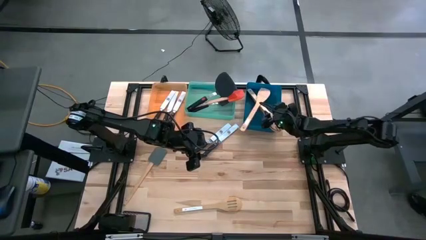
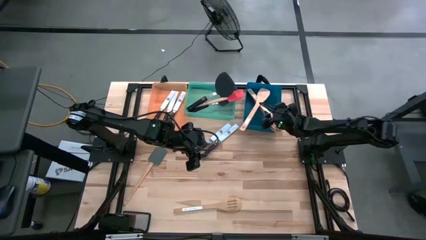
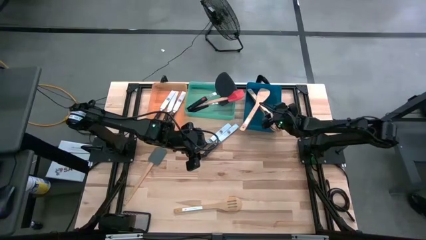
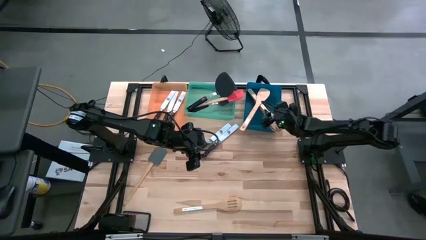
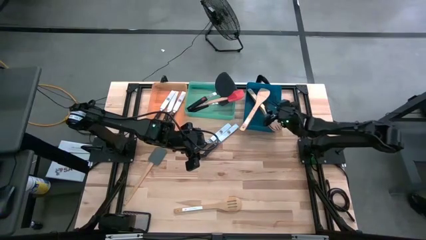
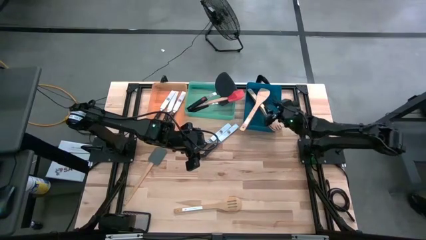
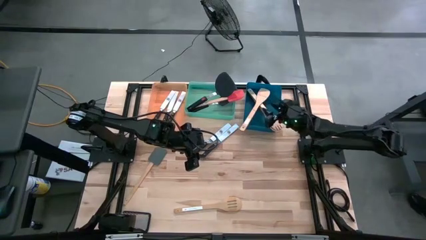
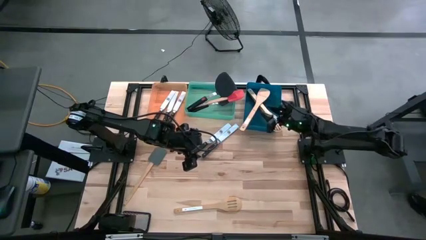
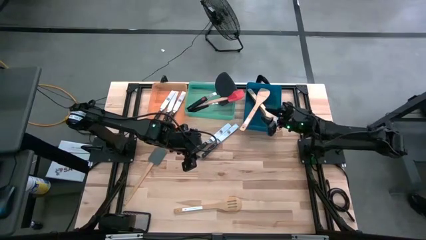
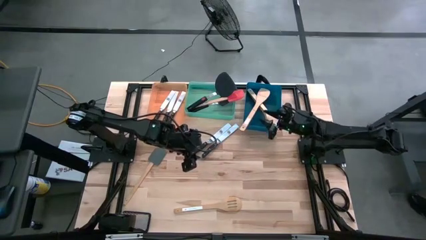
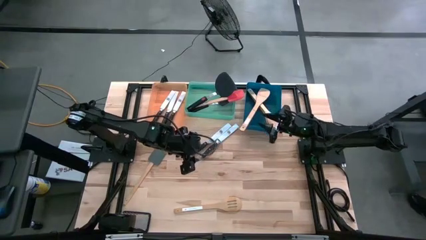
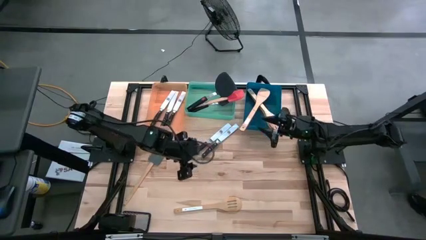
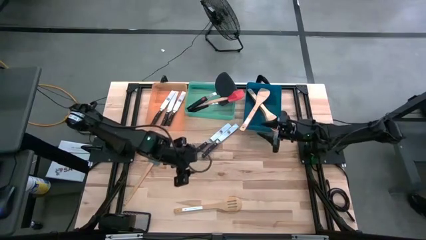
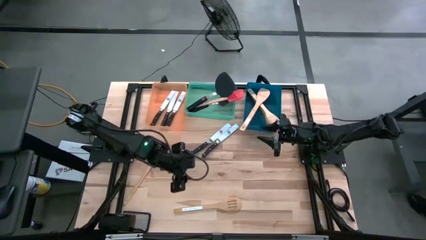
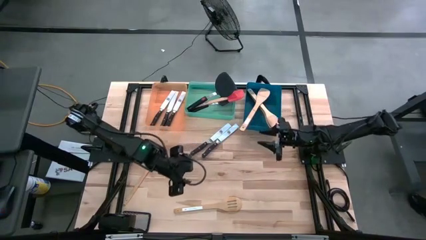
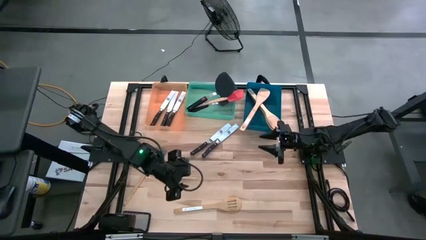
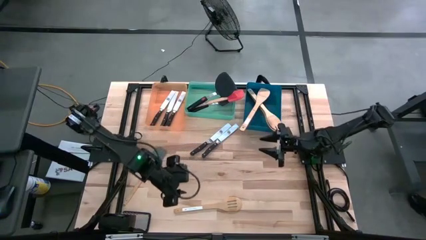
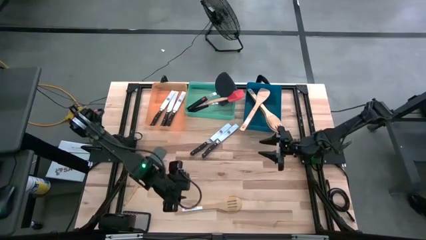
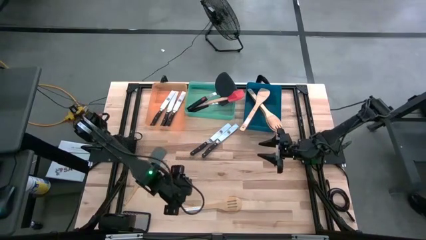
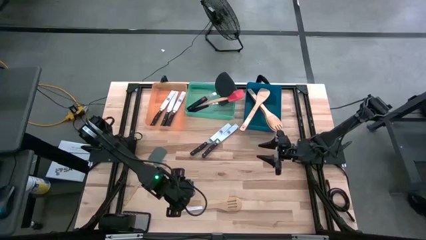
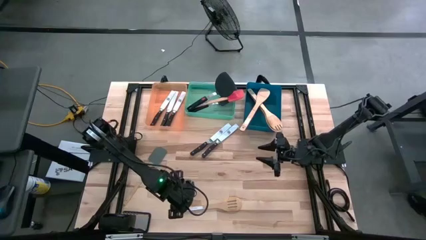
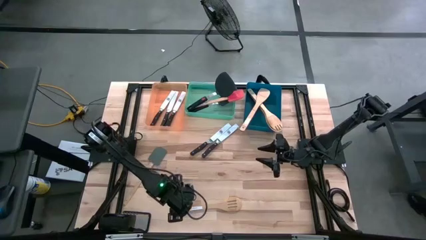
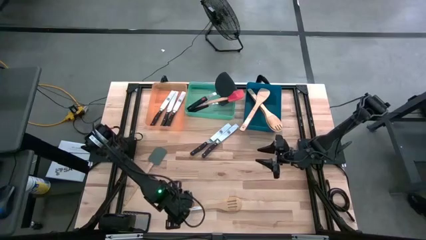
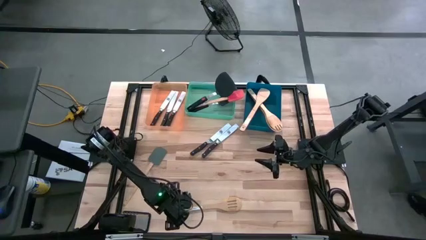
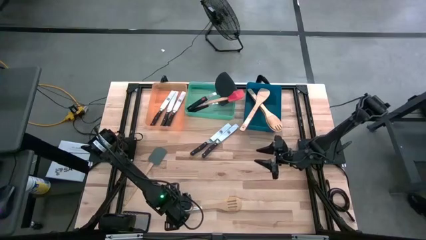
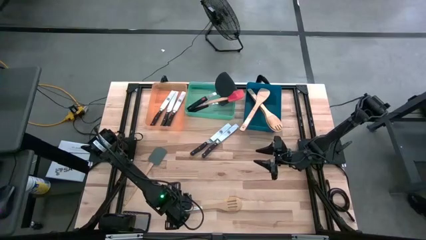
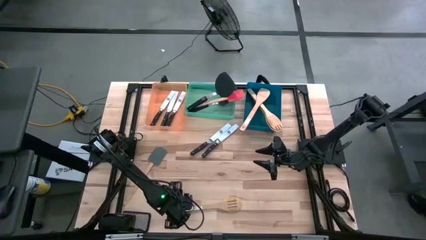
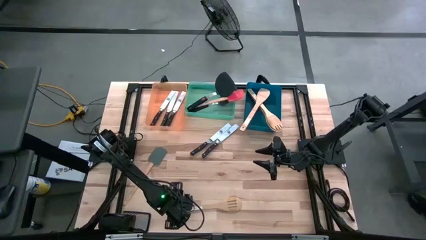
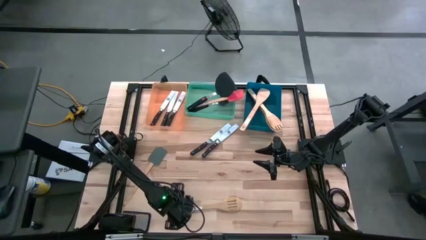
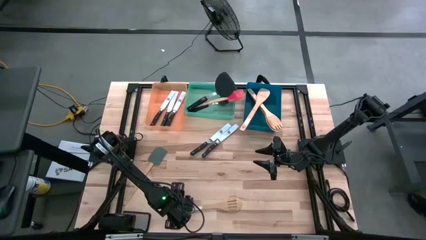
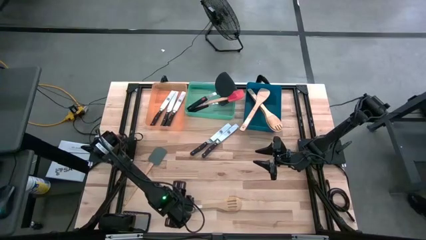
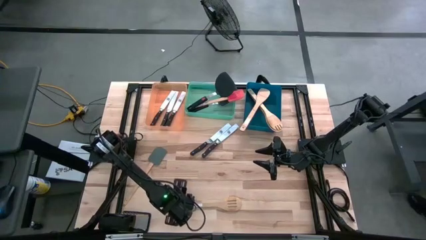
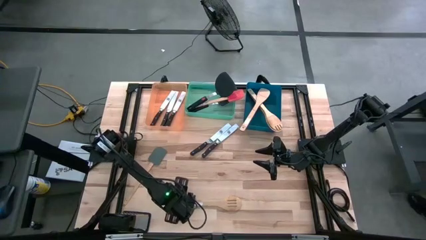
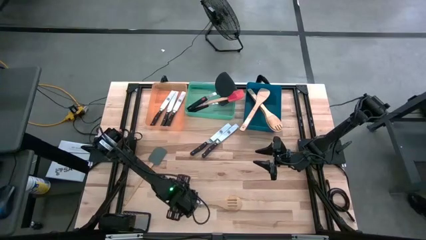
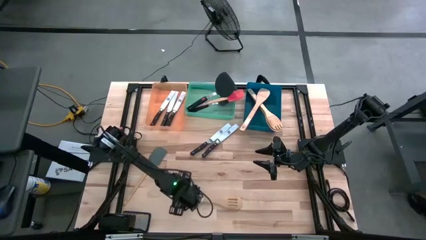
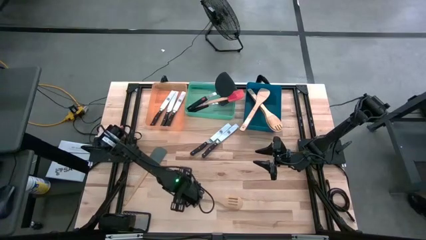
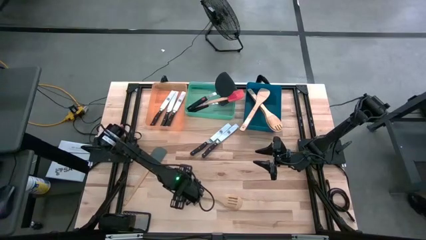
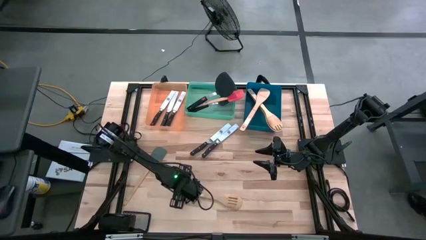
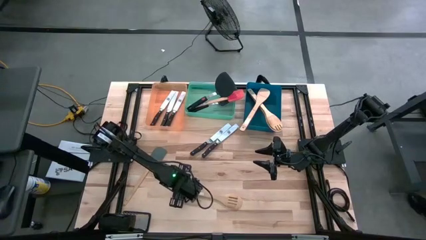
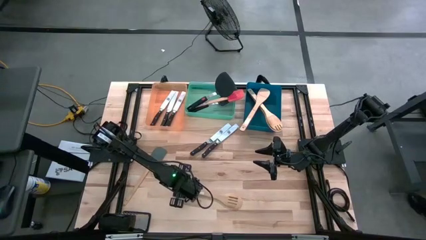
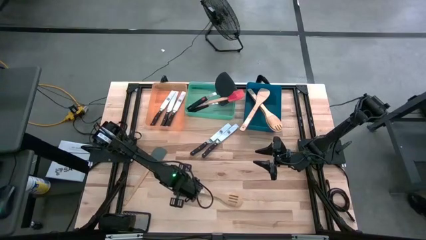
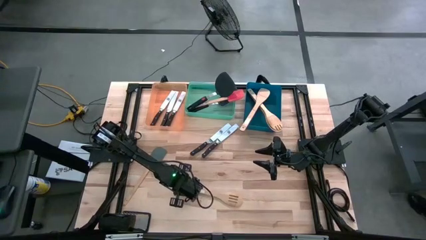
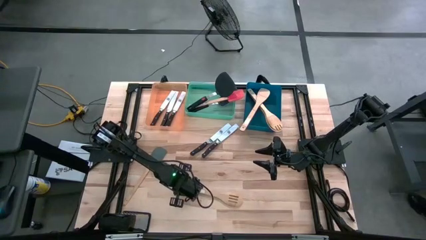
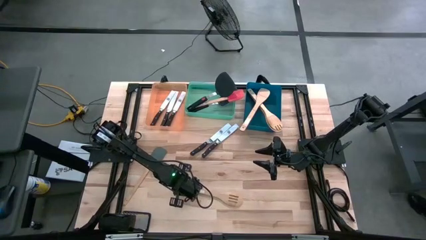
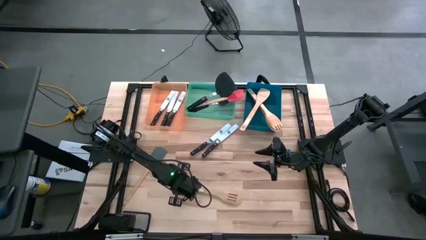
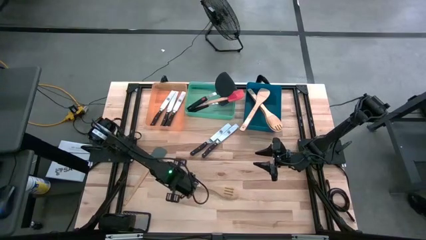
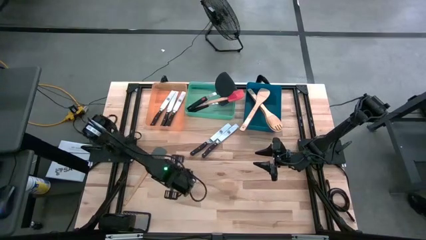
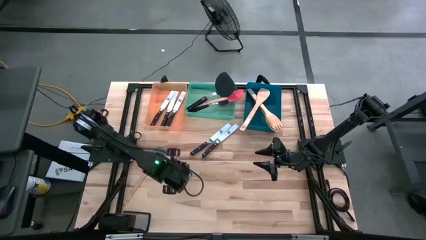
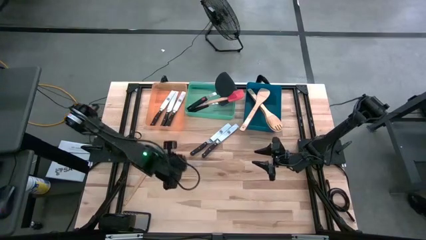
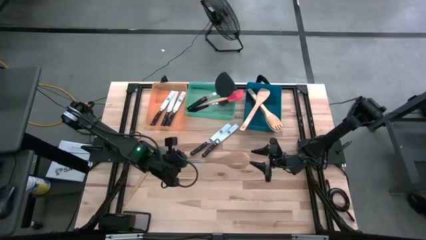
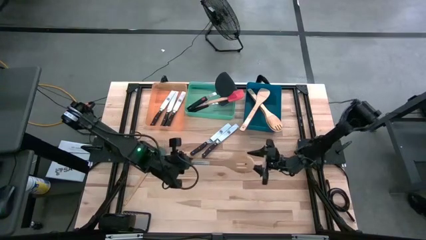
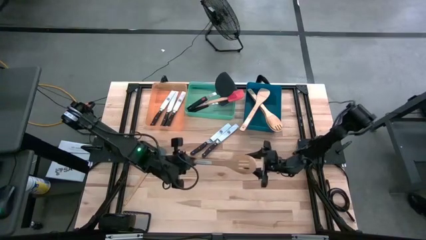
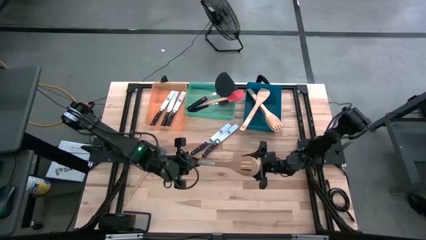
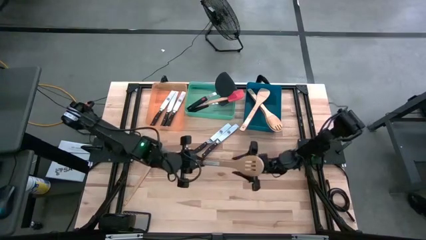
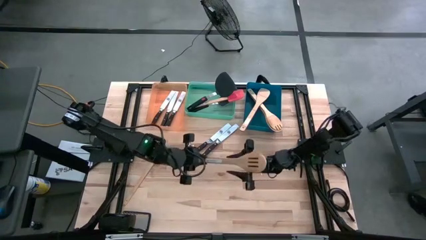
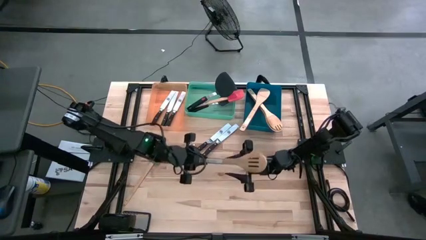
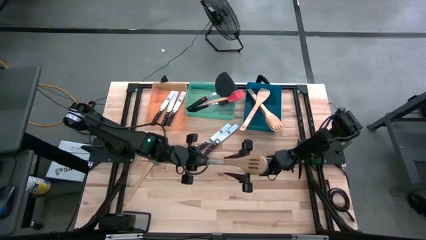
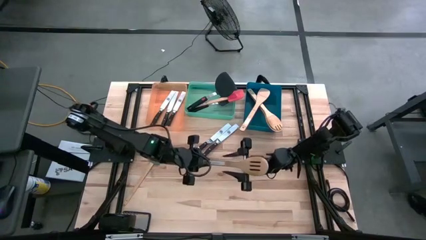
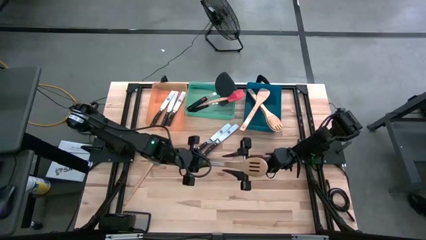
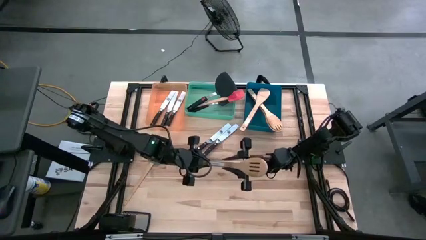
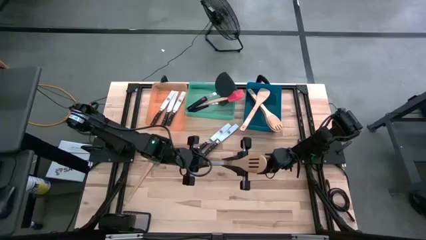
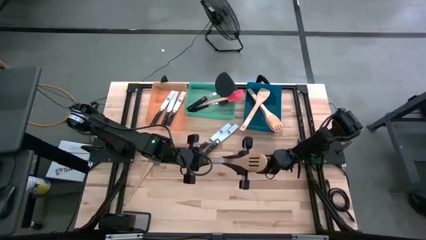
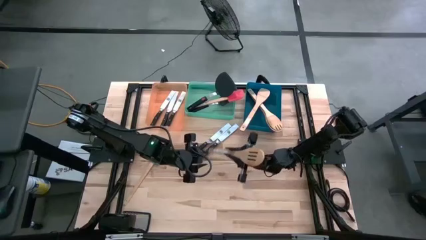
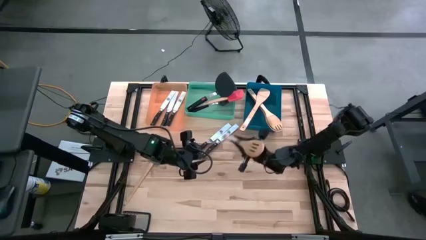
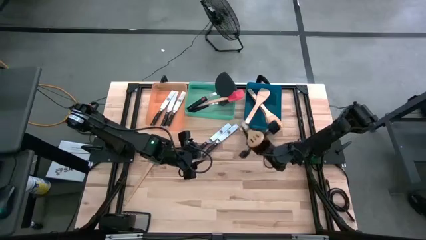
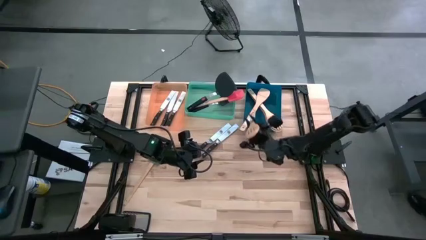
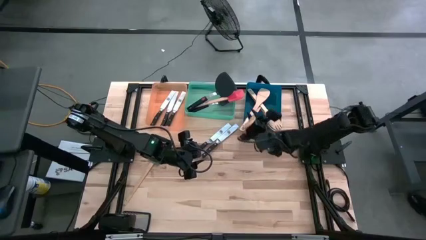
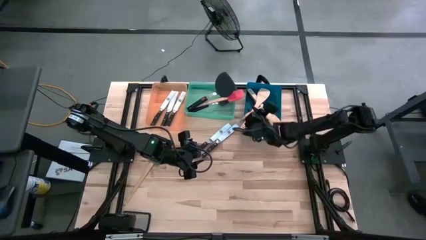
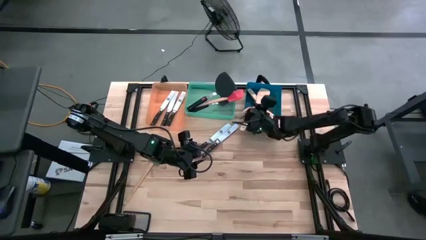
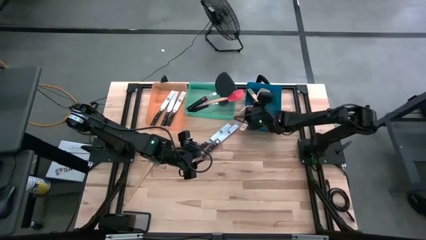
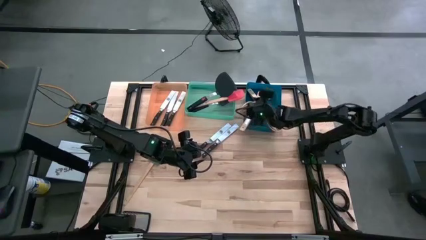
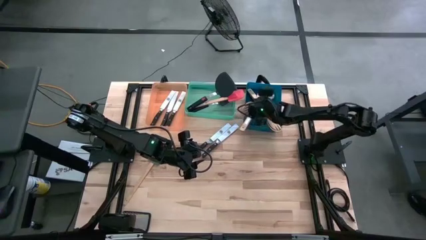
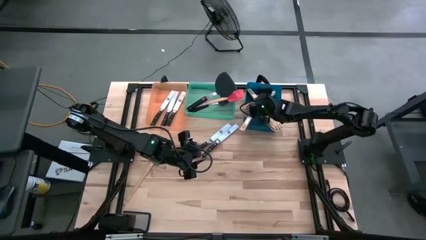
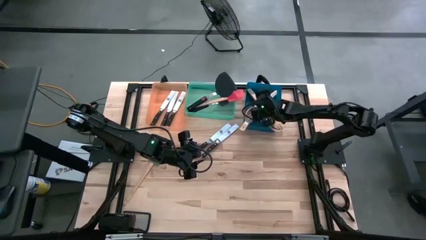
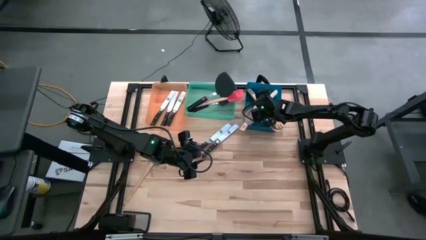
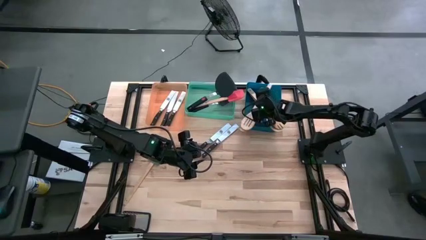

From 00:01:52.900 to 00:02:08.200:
Task: Pick & Place Kitchen Items
Put the brown serving spoon the blue bin

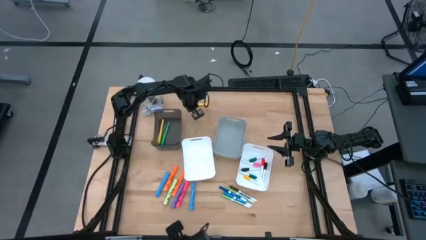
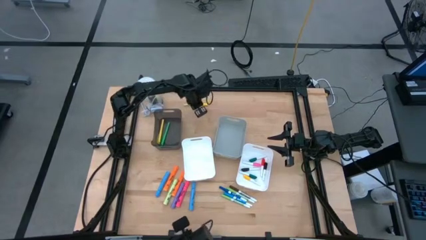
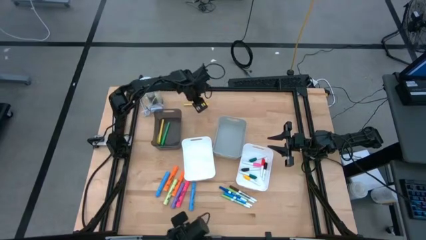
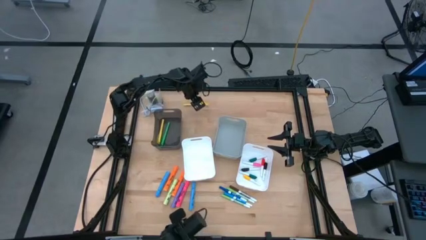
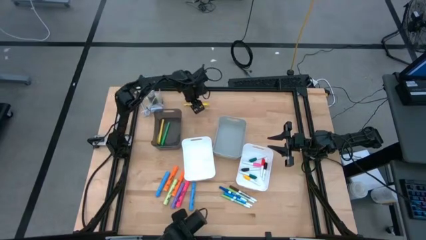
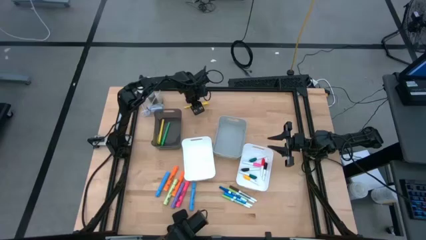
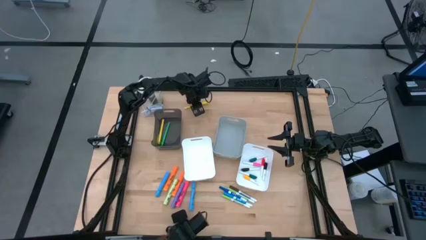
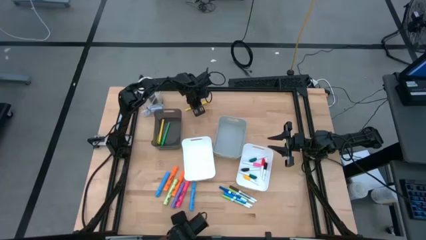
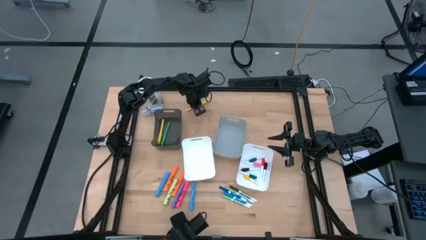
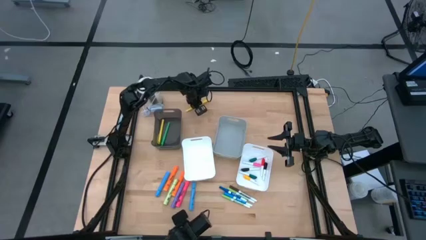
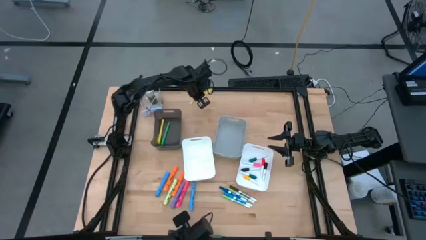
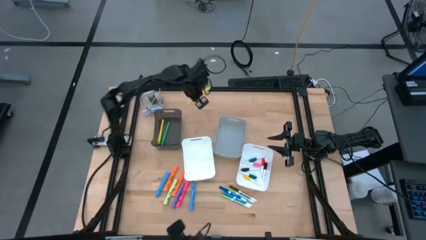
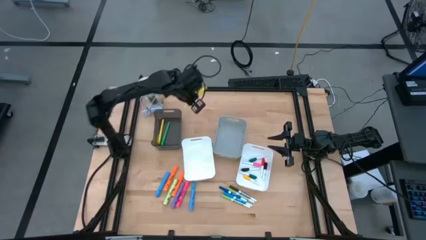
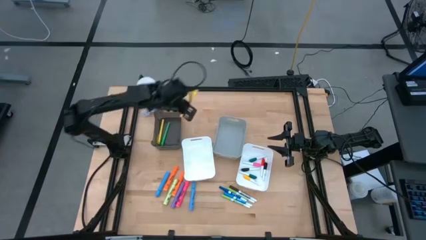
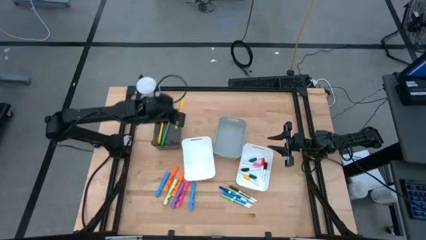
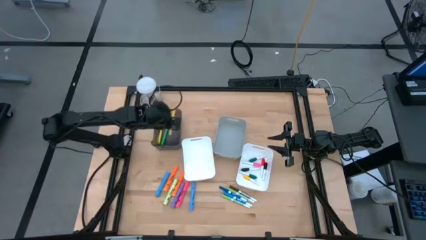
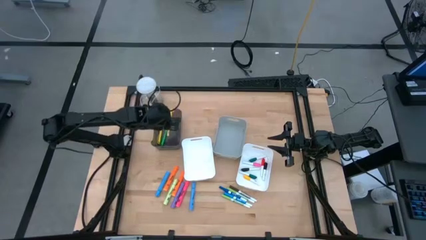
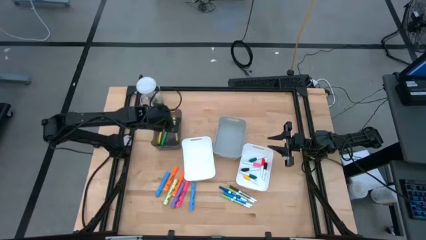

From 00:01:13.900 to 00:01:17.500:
Task: Pick & Place Markers
Put the yellow pen into the black bin
